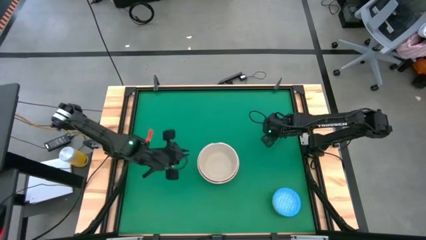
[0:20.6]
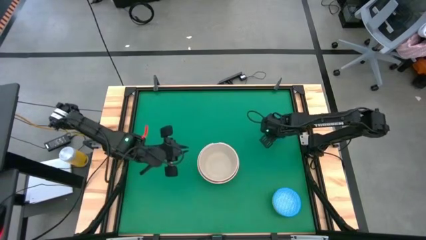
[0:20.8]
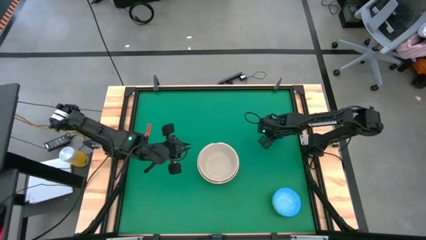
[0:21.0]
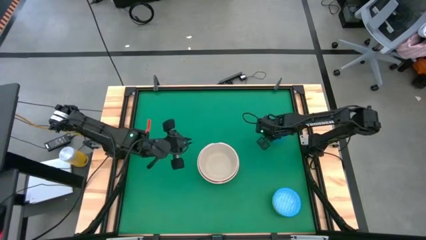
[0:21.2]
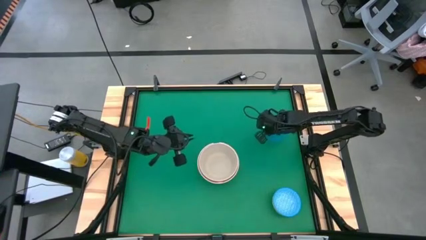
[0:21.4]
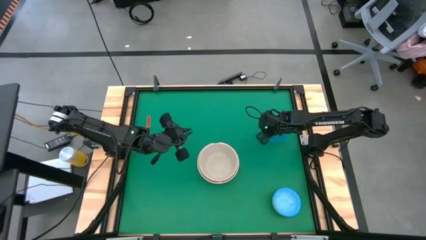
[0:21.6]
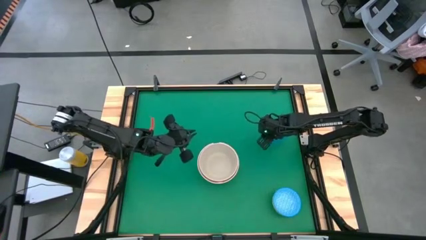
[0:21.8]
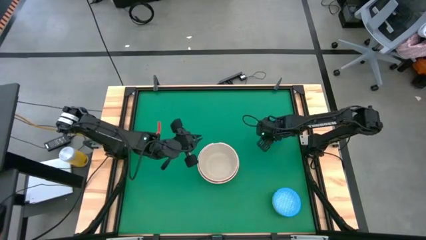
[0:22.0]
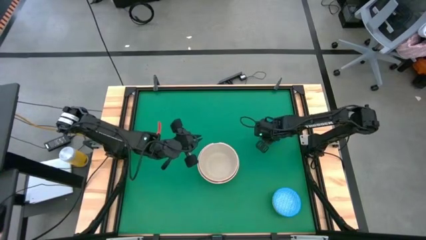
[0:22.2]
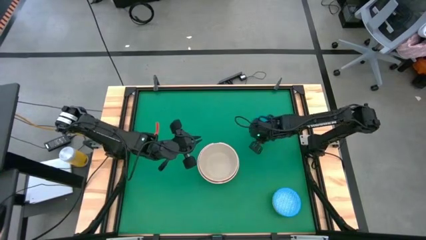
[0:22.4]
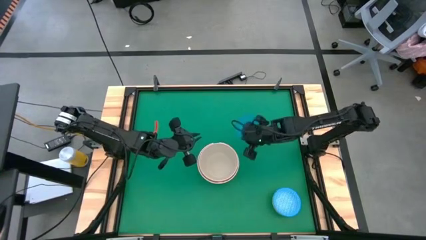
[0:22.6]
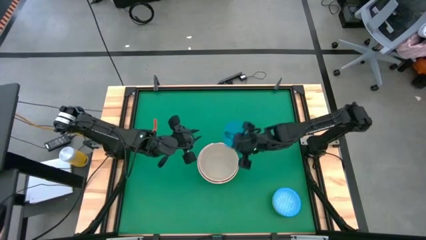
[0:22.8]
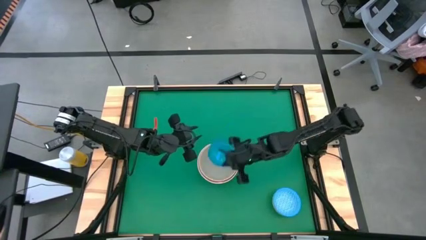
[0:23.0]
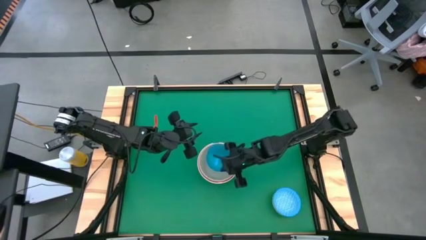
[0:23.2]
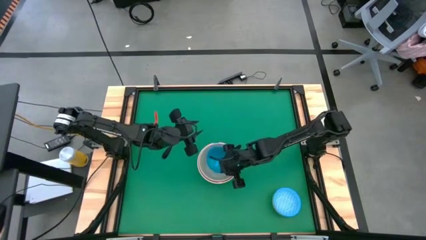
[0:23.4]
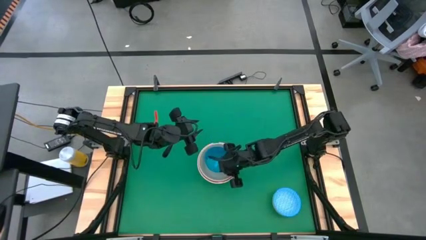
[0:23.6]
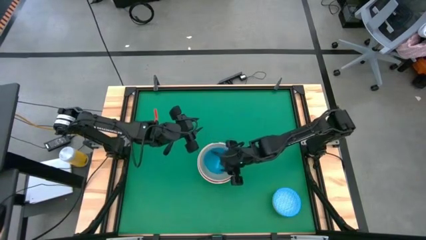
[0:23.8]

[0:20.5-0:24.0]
Stack the blue bowl on the gray bowl

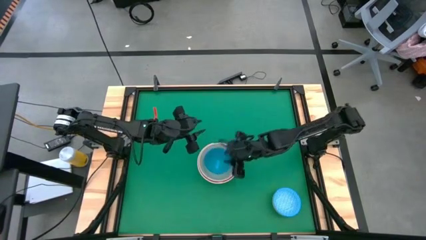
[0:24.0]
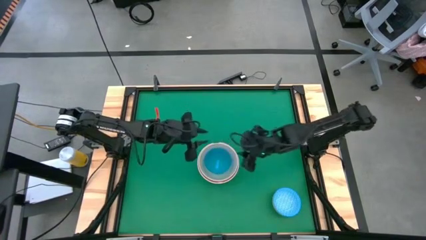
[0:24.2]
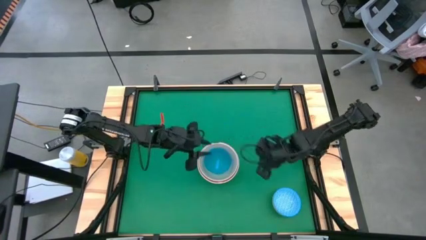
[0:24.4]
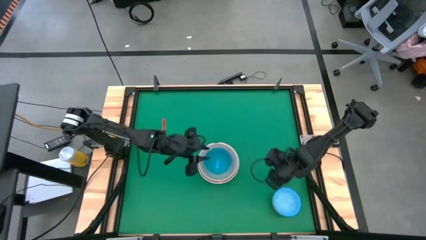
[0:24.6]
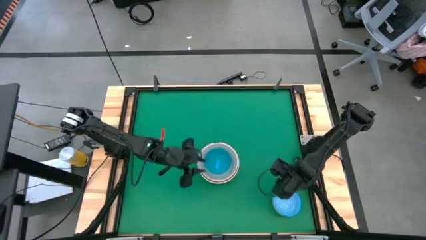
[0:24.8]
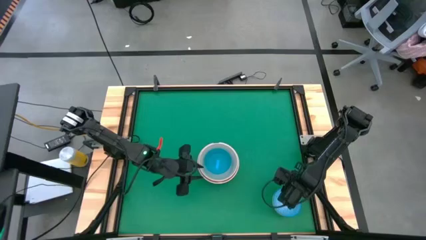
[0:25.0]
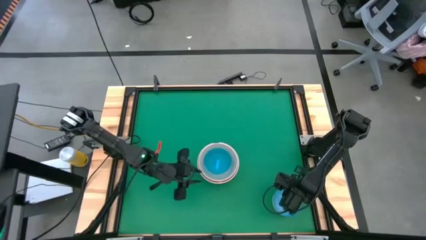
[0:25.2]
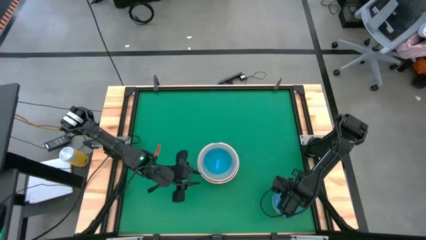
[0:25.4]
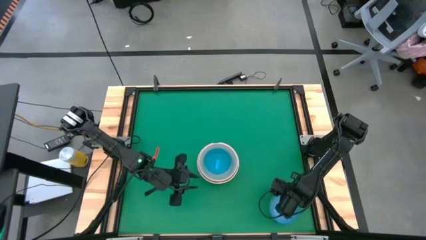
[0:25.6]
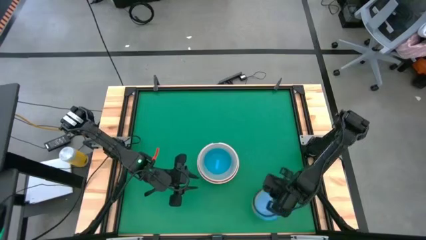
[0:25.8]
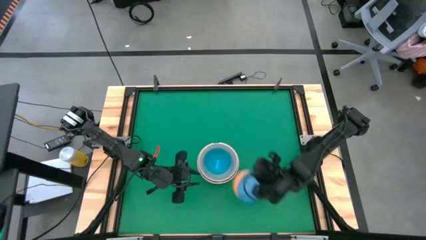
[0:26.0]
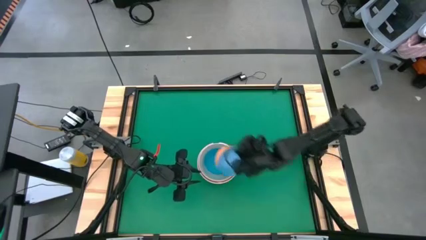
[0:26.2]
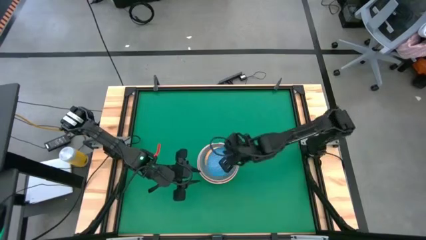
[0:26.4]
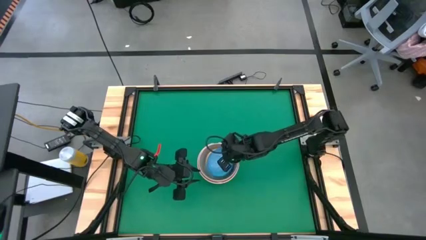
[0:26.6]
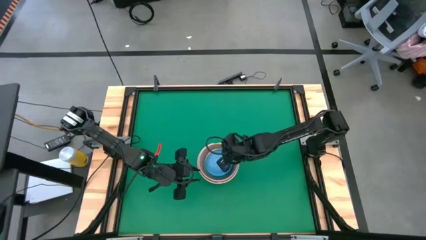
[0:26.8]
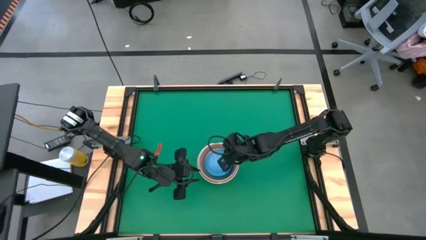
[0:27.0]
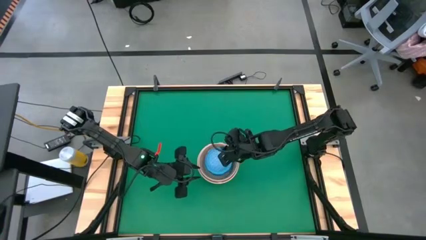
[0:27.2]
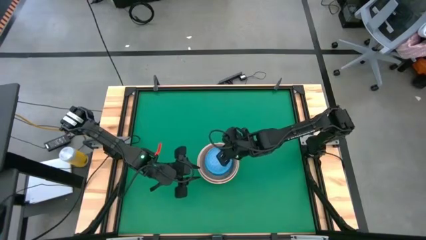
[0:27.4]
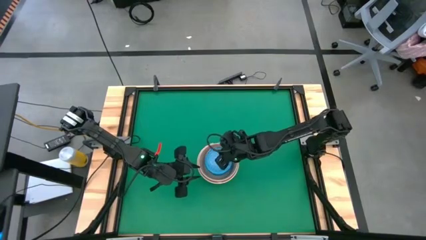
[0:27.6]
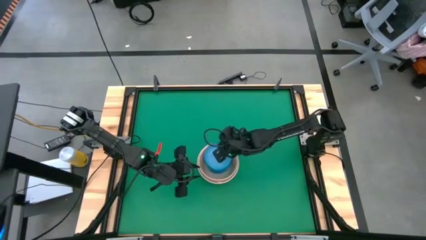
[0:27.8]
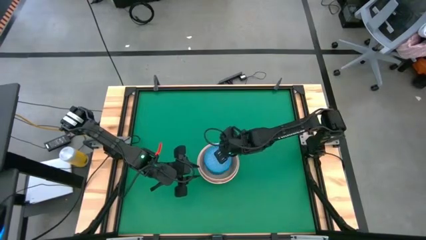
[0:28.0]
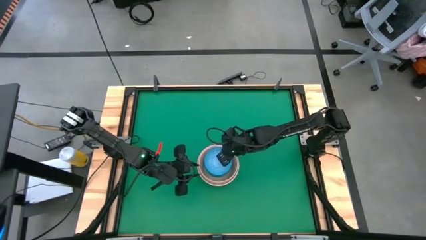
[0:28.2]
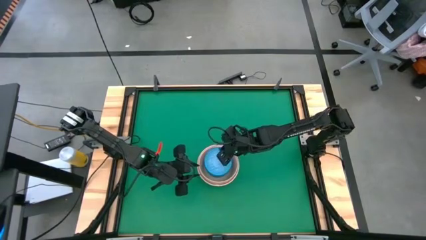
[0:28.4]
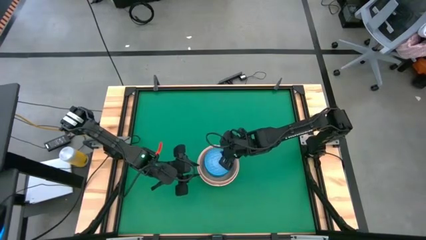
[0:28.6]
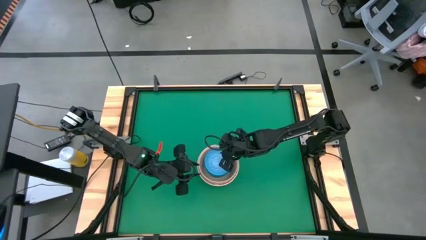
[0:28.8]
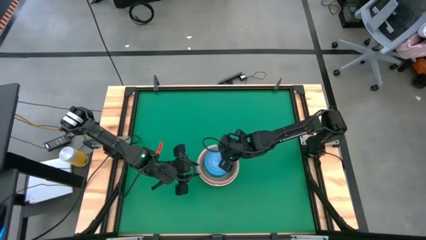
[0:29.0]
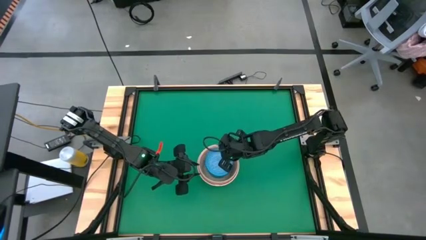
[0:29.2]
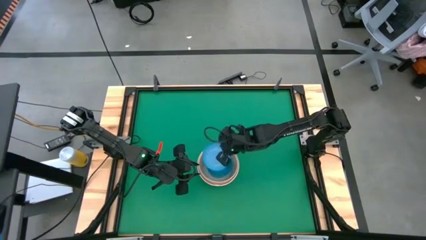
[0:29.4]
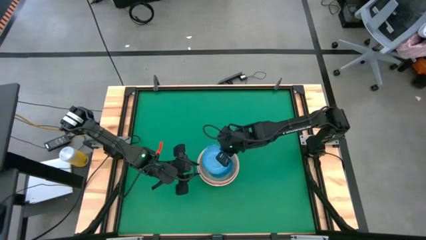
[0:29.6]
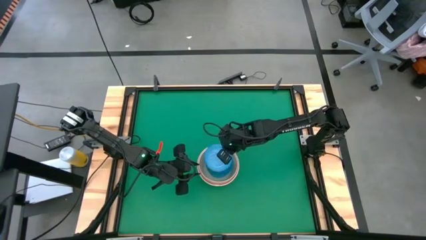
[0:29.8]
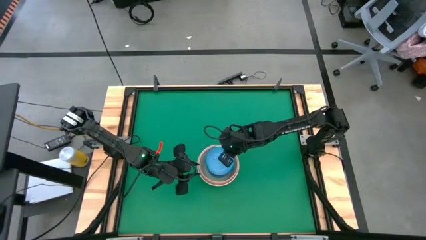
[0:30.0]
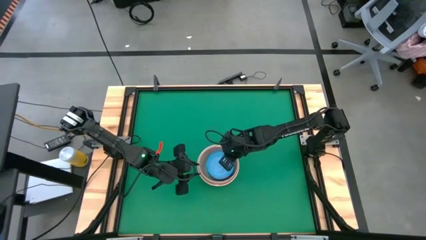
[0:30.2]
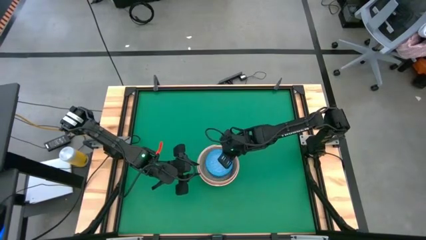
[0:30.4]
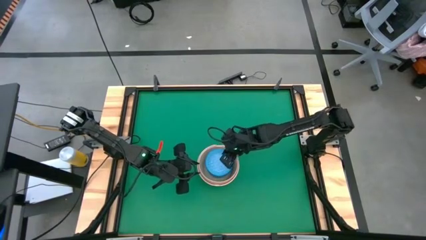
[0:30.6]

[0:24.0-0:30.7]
Stack the blue patterned bowl on the blue bowl

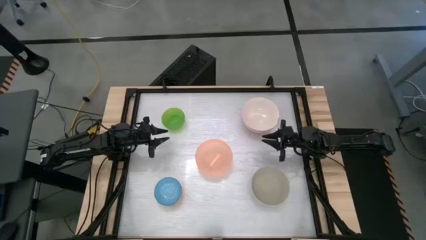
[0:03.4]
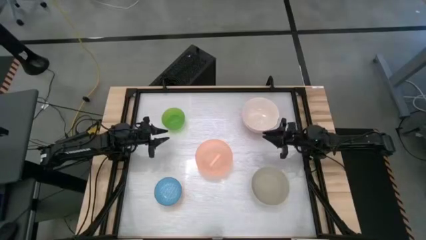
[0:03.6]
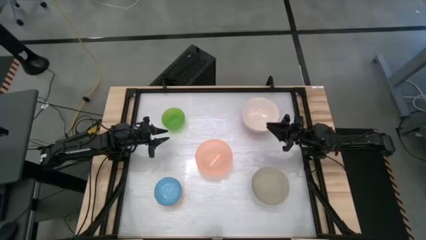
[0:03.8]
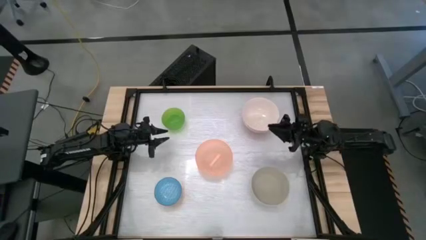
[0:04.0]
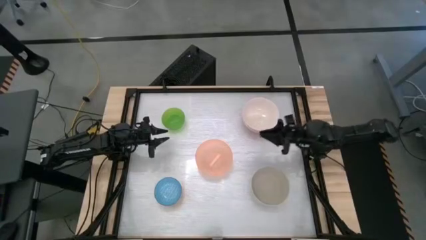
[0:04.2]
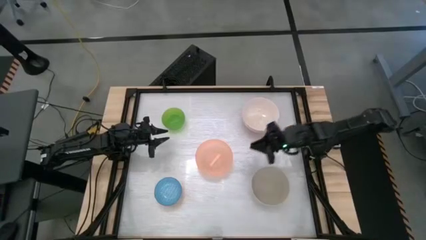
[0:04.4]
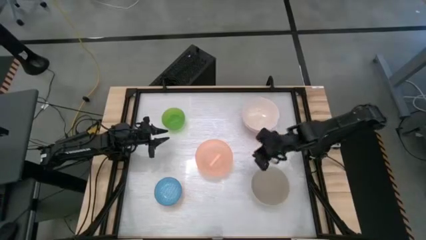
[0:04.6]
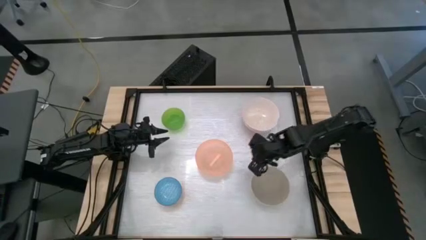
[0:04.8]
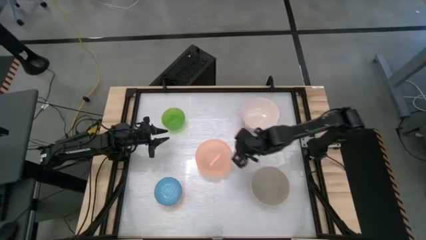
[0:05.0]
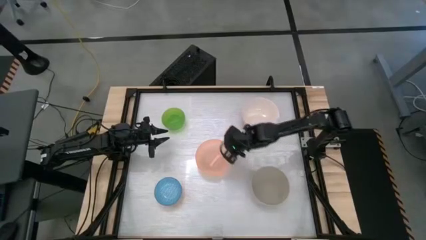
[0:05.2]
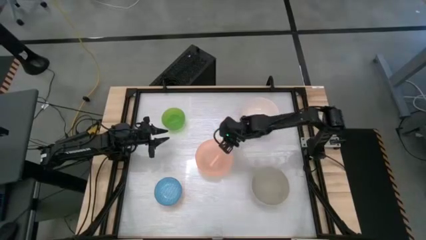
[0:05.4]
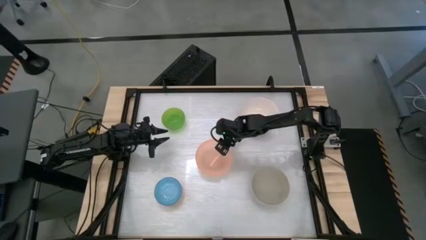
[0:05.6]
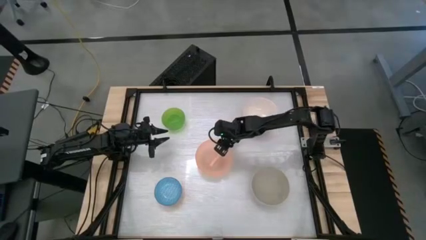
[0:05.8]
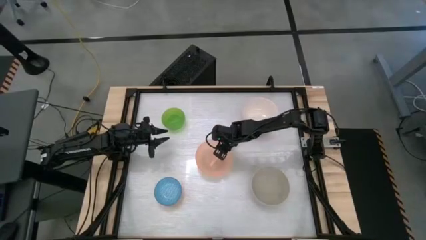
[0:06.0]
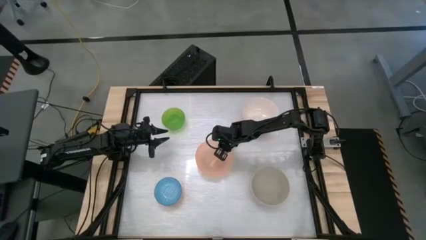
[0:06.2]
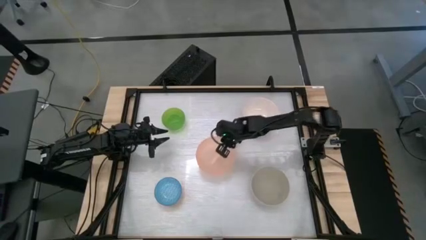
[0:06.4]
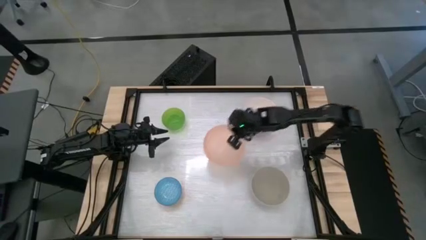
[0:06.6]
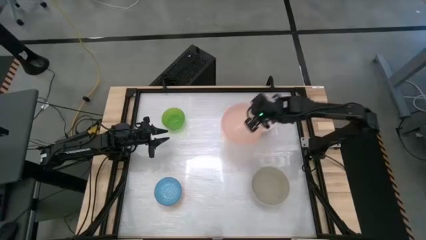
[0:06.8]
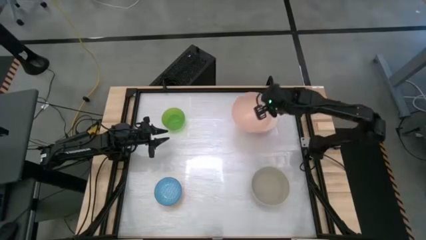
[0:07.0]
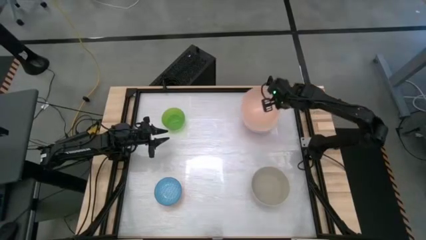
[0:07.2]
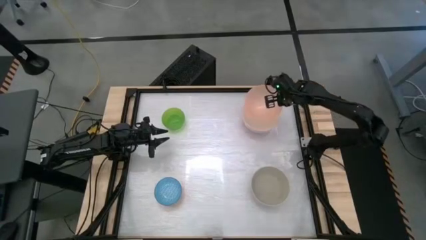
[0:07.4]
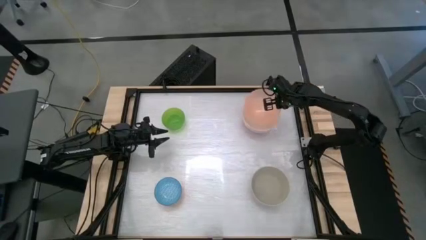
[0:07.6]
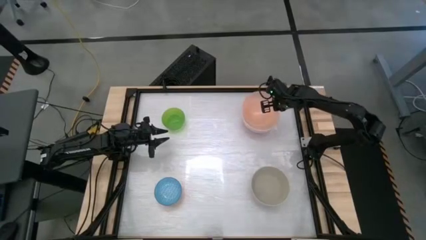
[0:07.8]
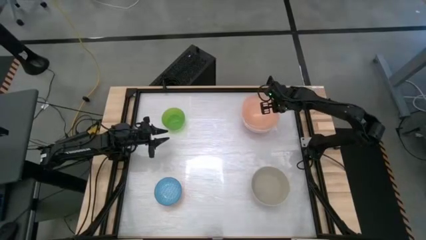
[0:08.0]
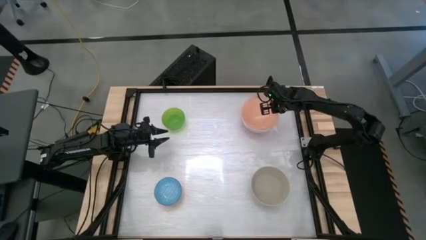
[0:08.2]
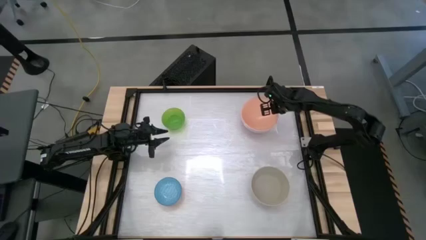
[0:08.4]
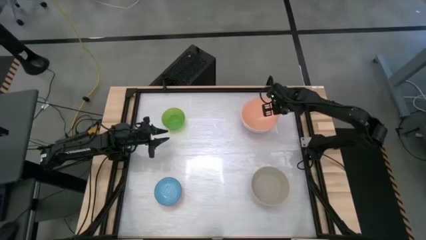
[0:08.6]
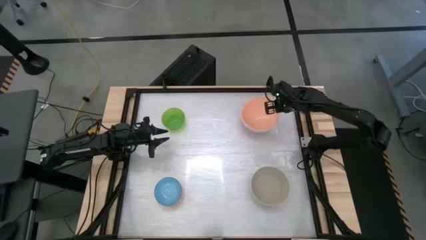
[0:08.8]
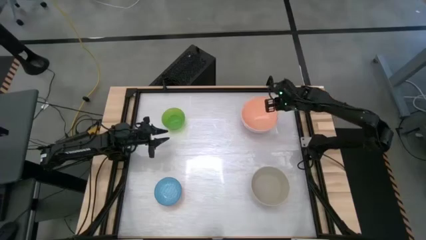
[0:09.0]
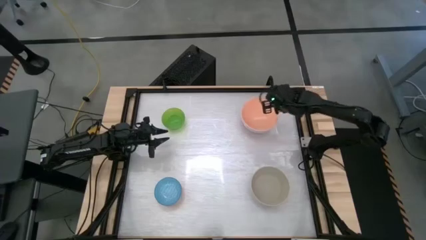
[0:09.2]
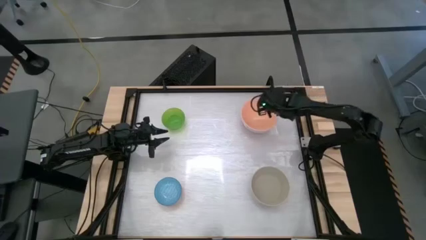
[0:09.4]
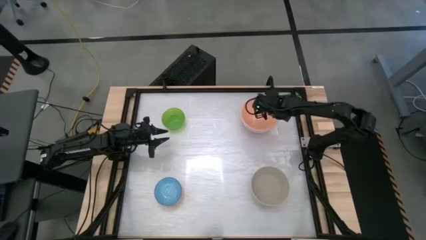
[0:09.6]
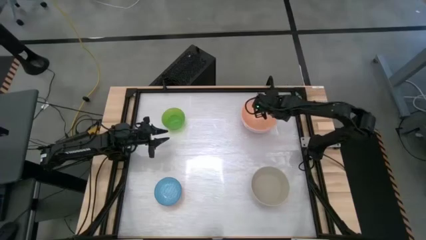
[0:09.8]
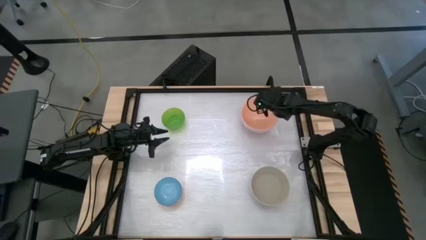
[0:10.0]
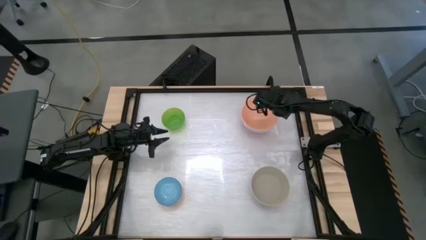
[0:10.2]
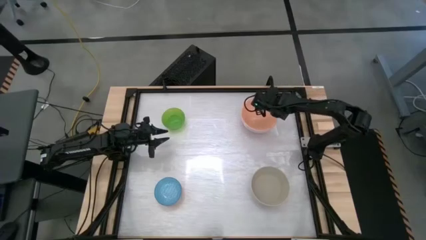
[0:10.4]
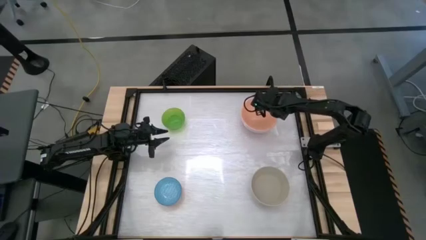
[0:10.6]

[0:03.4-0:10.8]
Stack the orange bowl on top of the white bowl
